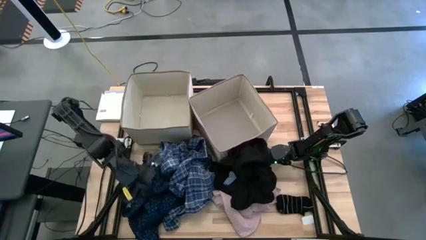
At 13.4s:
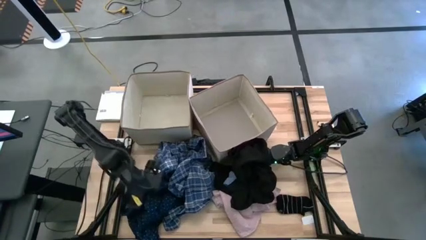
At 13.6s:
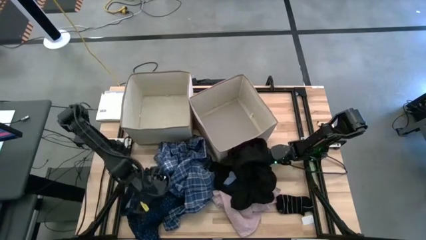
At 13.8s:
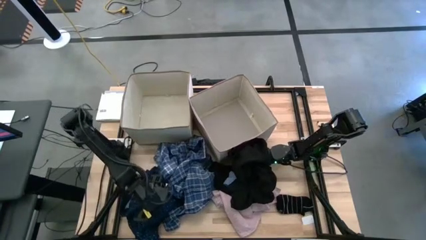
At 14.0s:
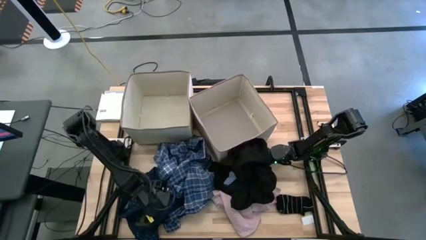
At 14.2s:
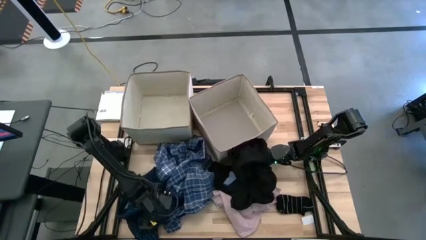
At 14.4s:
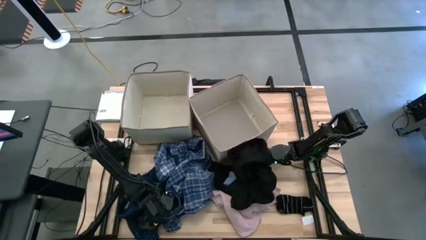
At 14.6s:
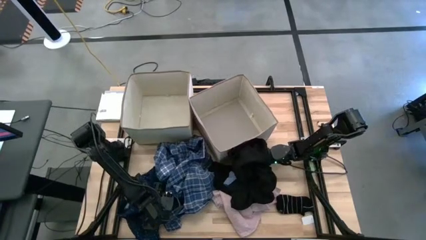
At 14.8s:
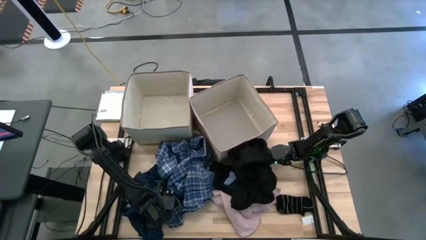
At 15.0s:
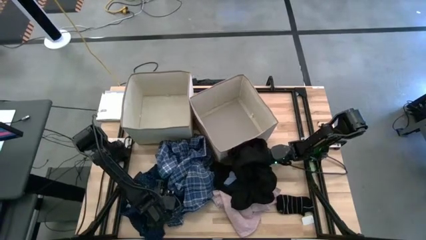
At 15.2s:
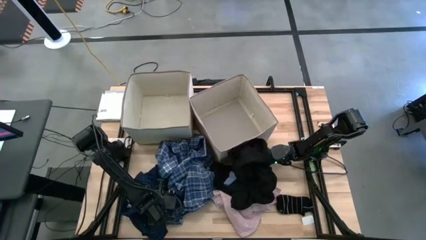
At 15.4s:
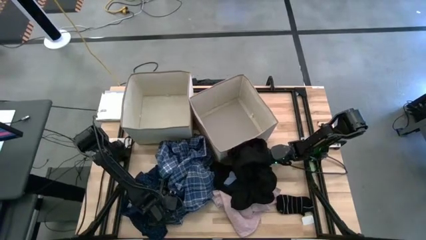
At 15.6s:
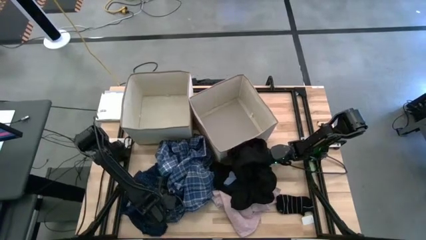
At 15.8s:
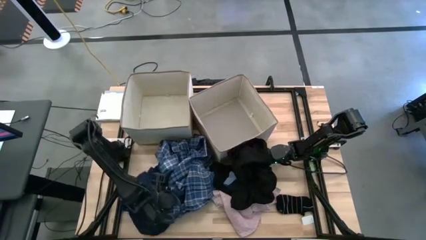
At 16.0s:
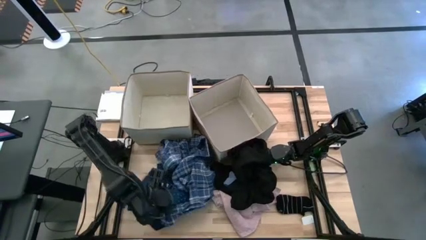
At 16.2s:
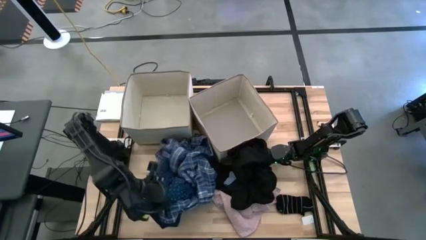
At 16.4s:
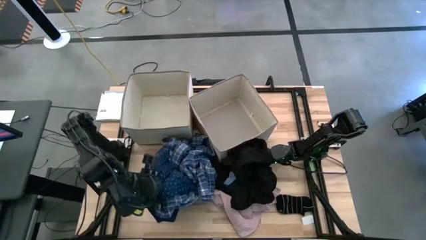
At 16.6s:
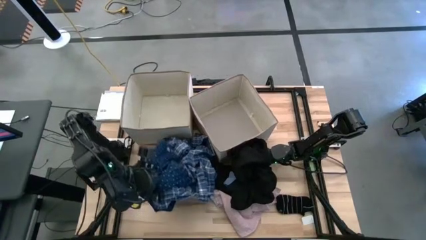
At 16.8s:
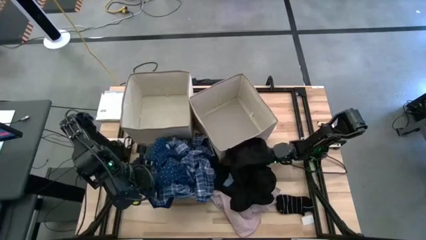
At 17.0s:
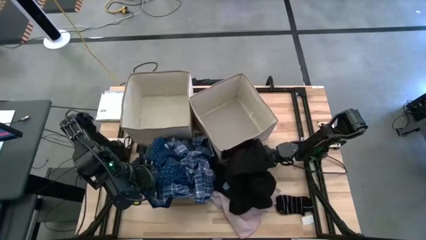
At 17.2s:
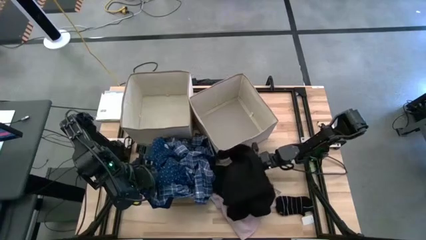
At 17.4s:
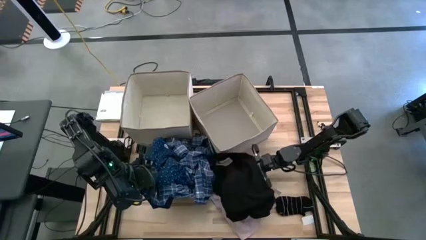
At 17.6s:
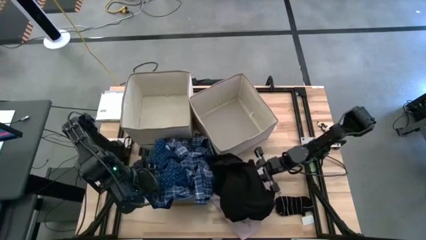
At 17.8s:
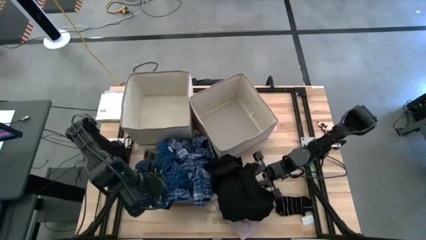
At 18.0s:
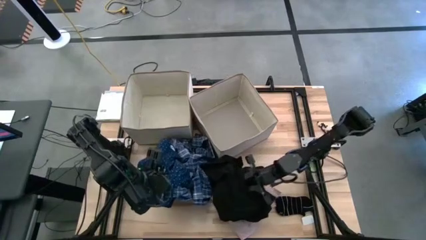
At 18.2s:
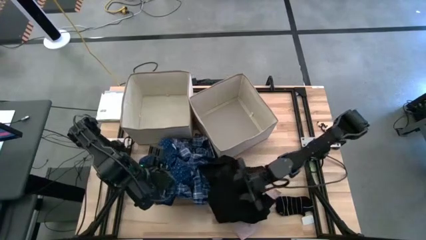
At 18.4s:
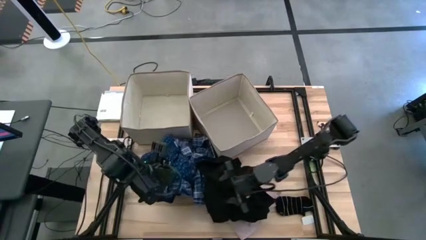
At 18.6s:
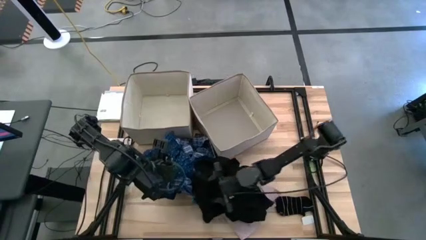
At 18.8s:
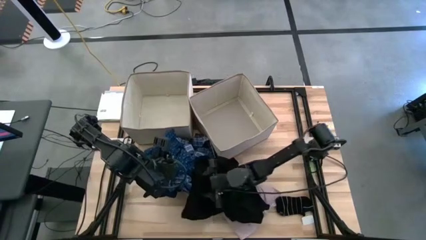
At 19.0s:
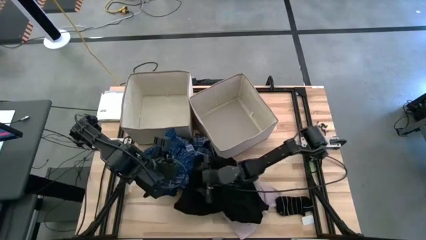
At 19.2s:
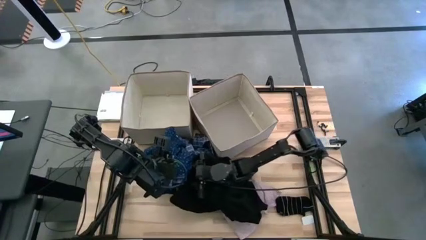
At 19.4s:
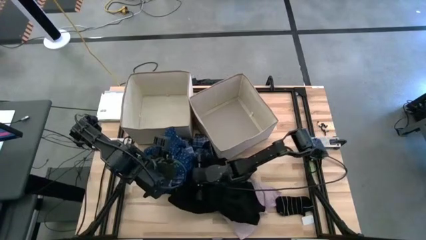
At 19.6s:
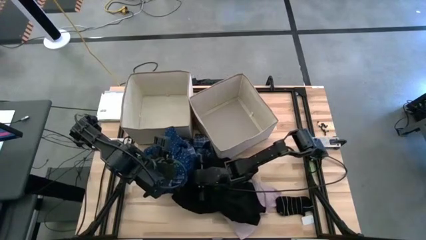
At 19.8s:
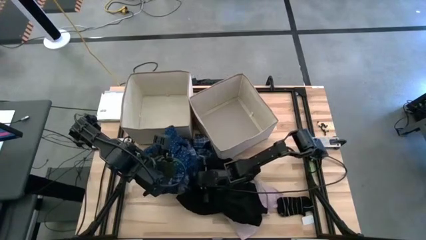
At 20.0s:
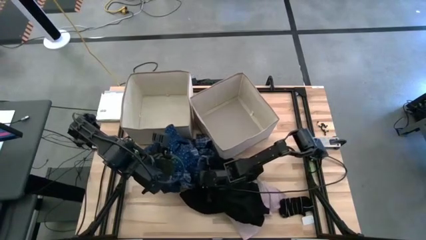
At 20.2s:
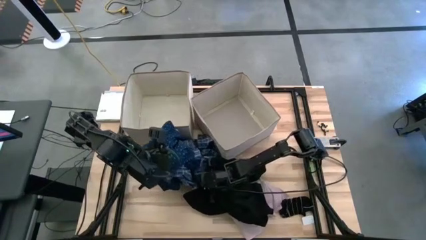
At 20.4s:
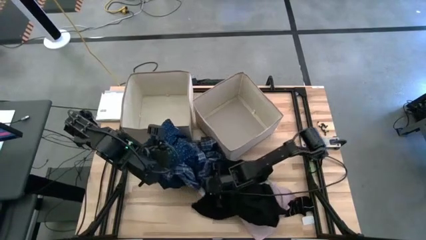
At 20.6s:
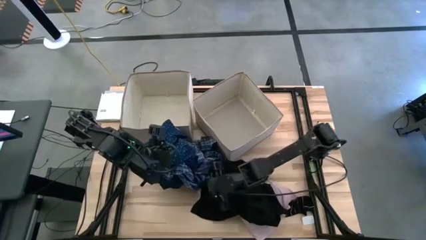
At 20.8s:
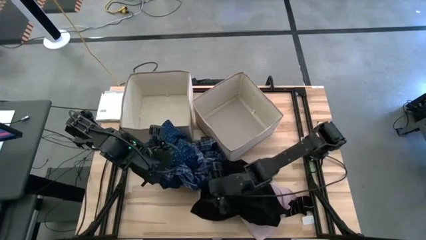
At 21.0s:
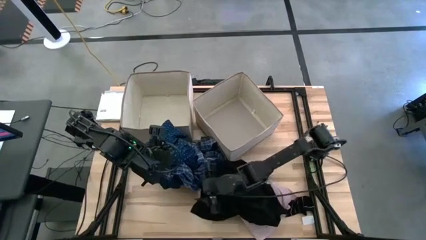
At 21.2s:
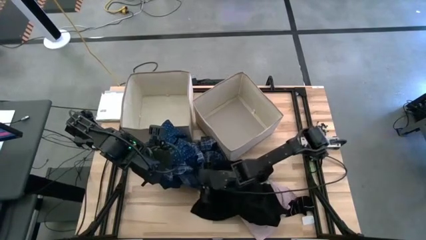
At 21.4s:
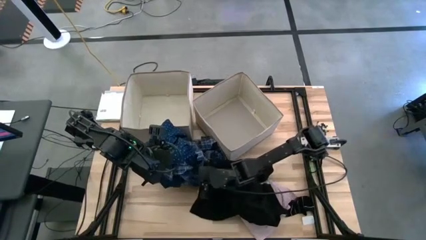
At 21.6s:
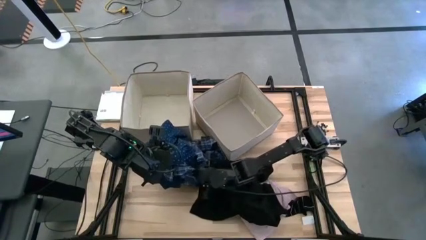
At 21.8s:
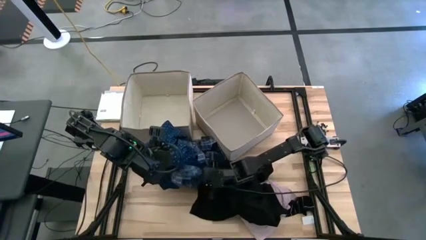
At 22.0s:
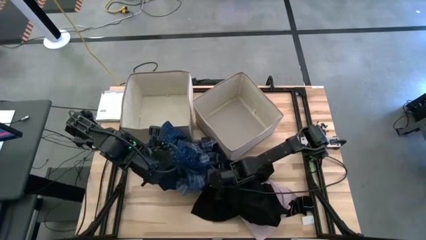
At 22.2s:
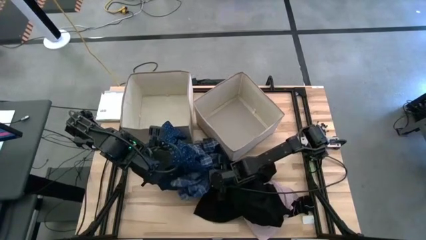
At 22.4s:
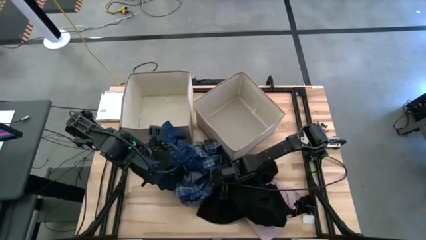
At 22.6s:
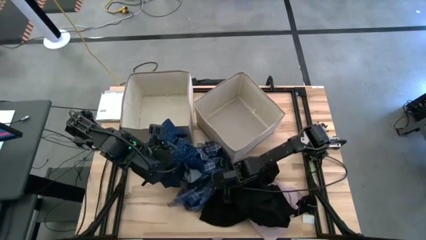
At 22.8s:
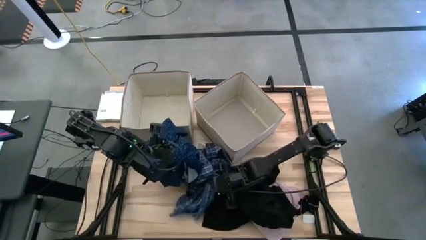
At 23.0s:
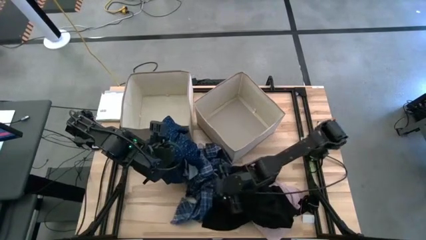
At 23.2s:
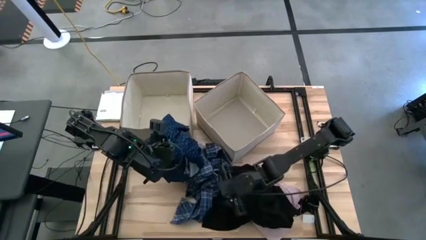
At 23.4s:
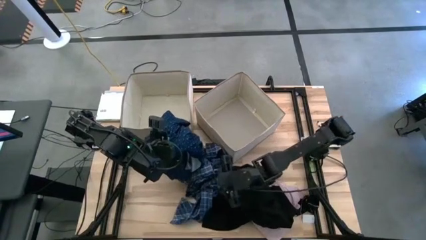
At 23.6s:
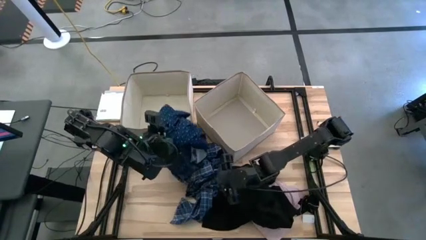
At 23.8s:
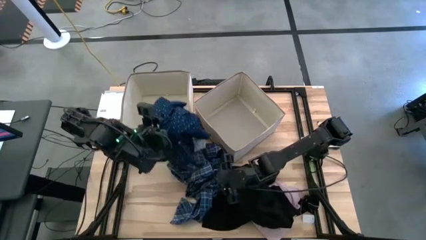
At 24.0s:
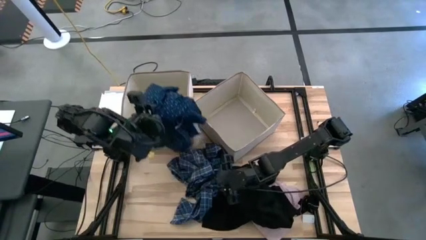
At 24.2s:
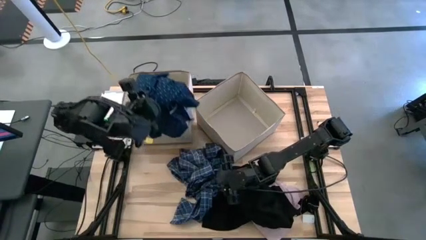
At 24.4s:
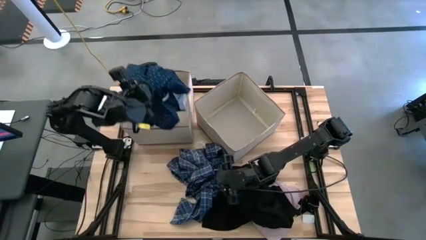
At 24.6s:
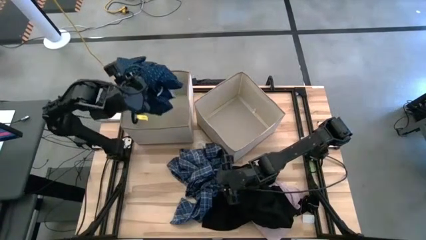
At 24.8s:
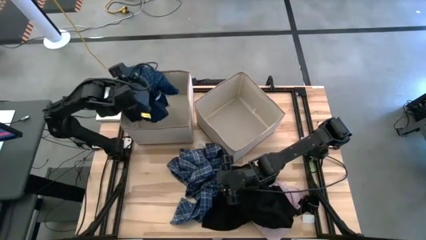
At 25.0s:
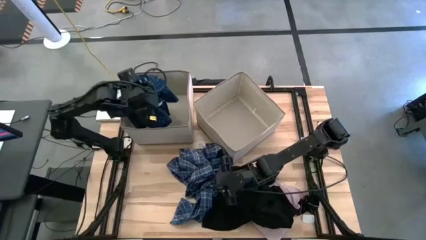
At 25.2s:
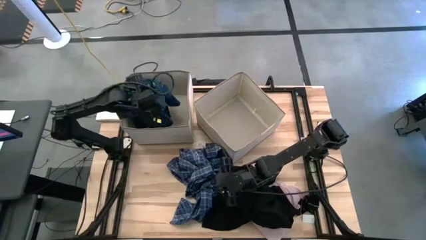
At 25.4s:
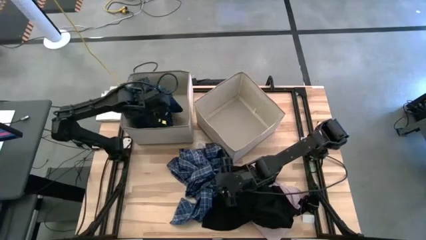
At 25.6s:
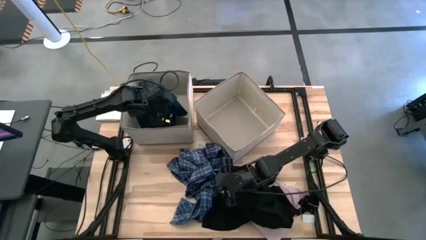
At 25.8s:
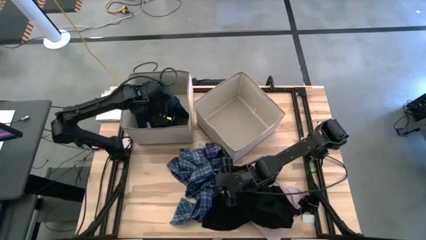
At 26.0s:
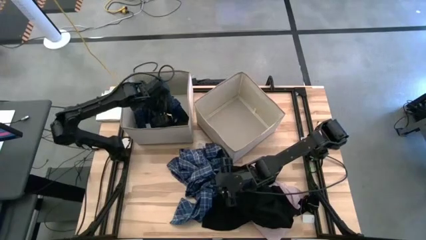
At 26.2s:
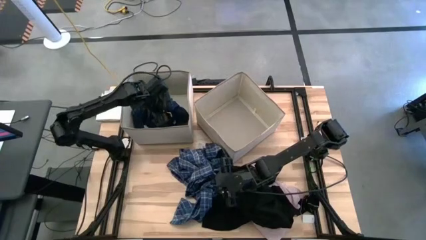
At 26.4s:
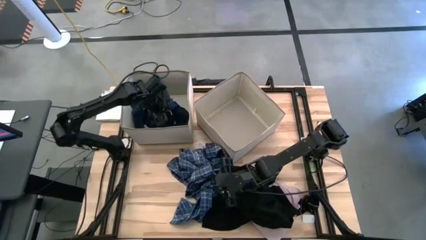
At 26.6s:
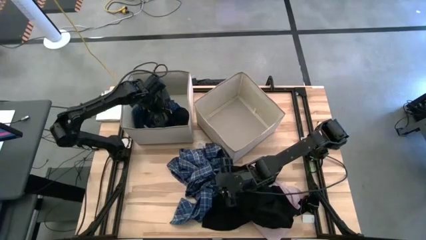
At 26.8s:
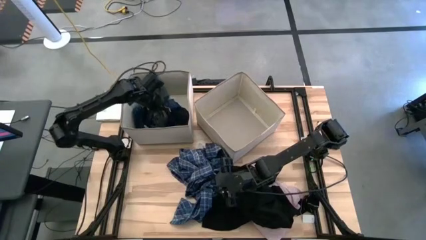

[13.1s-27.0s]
Task: Sort clothes
Put the dark blue shirt into the left laundry organizer
